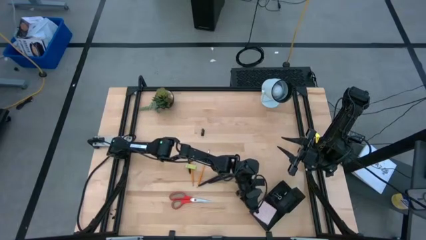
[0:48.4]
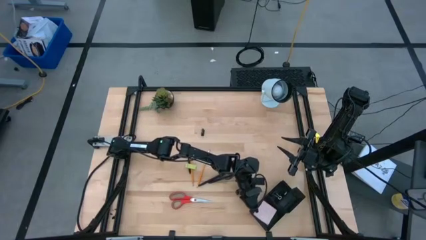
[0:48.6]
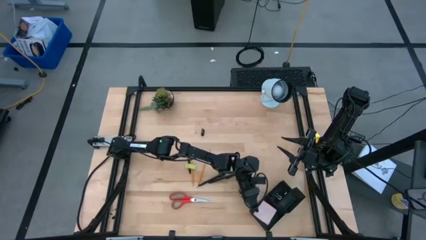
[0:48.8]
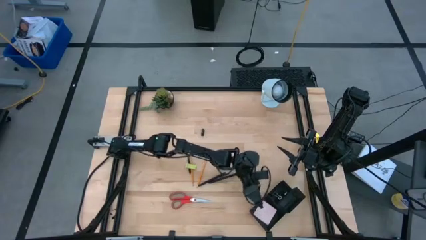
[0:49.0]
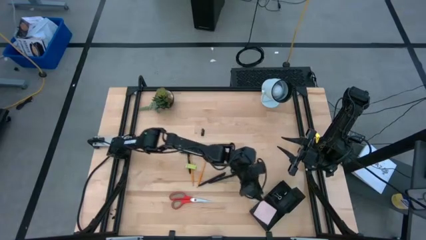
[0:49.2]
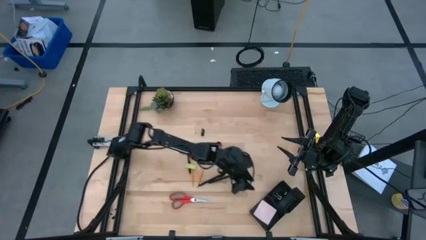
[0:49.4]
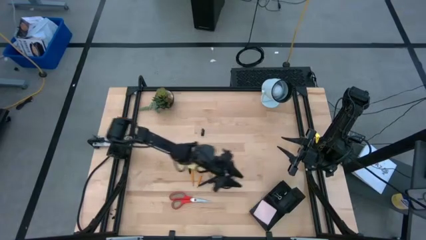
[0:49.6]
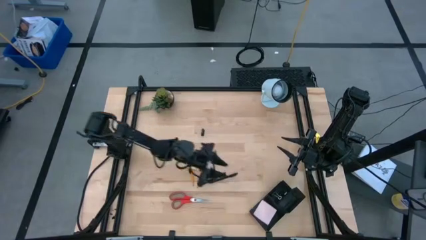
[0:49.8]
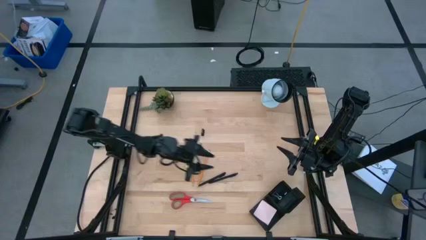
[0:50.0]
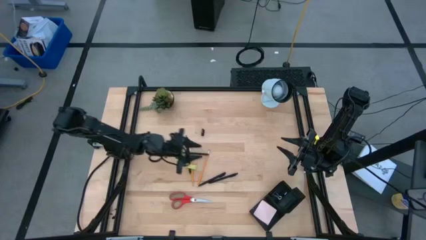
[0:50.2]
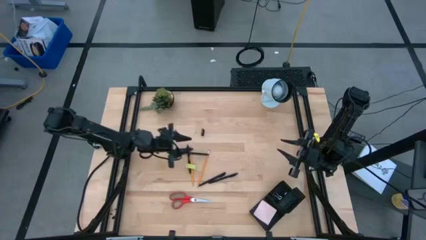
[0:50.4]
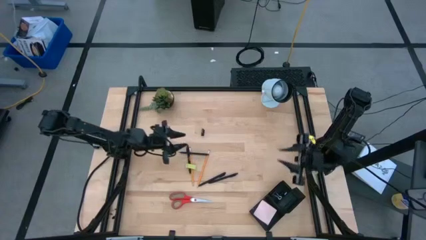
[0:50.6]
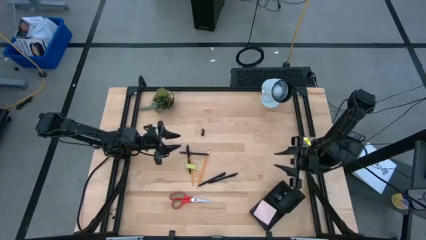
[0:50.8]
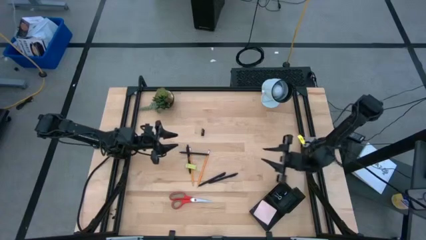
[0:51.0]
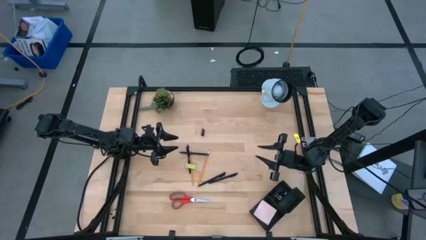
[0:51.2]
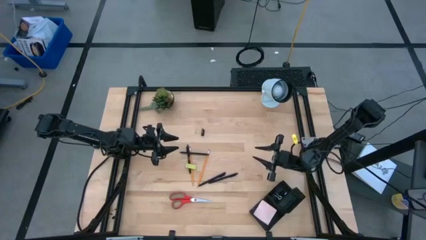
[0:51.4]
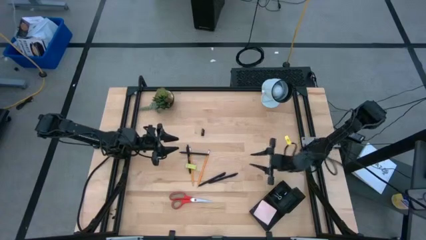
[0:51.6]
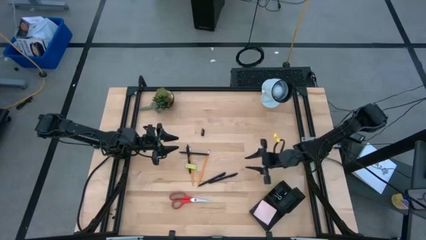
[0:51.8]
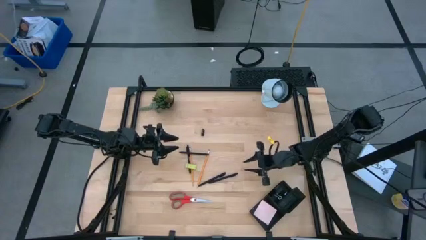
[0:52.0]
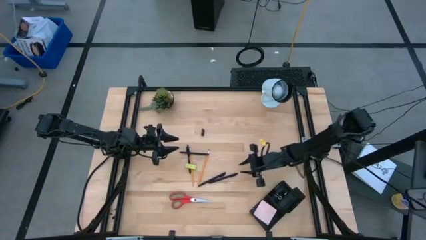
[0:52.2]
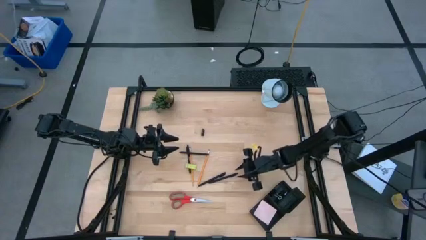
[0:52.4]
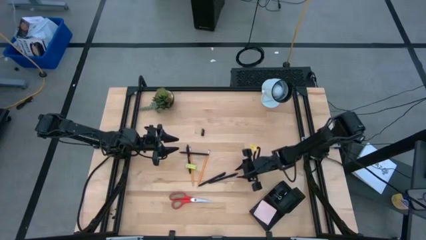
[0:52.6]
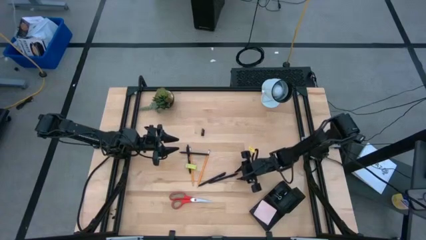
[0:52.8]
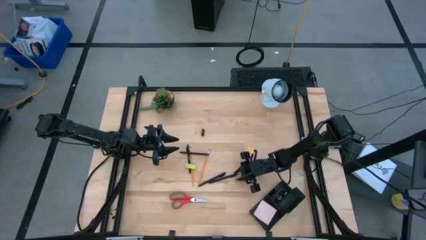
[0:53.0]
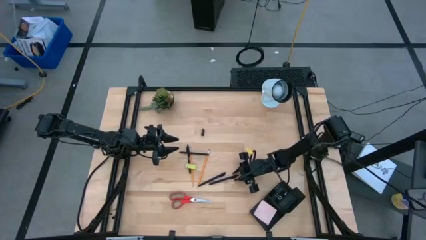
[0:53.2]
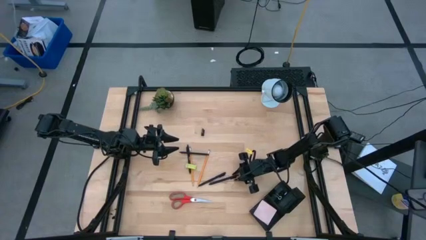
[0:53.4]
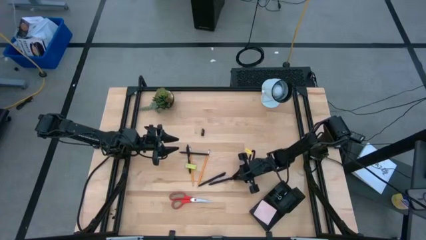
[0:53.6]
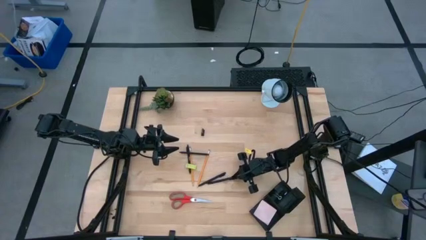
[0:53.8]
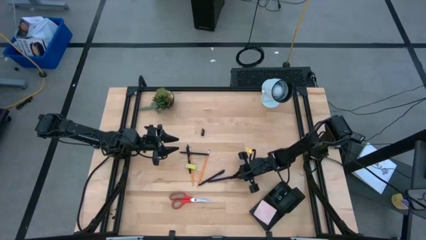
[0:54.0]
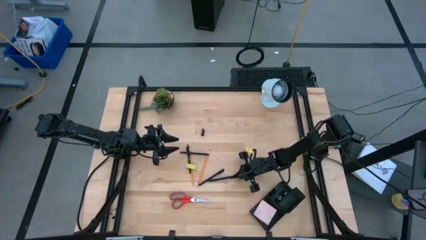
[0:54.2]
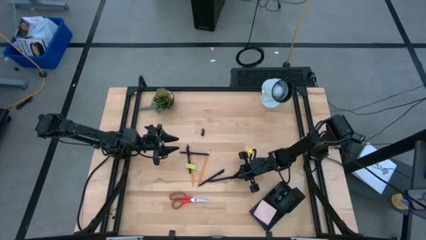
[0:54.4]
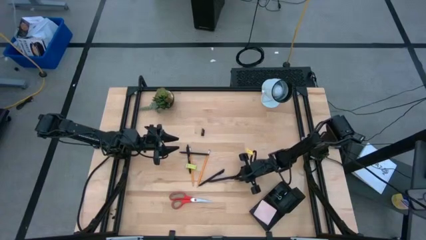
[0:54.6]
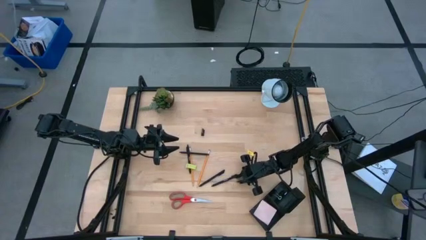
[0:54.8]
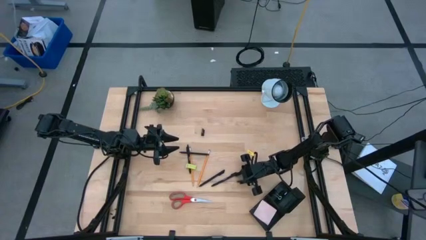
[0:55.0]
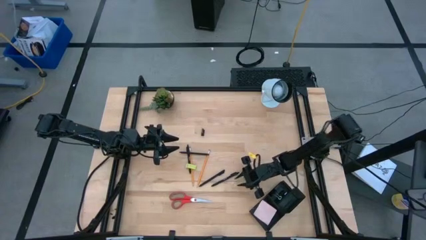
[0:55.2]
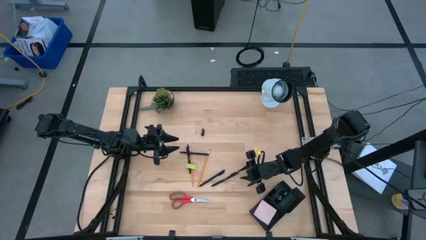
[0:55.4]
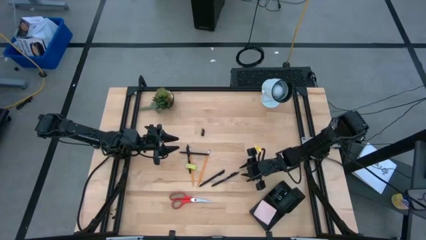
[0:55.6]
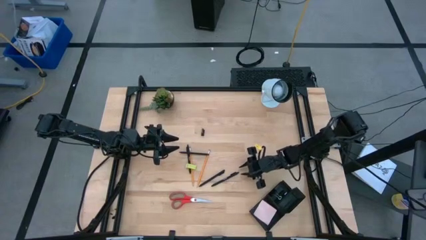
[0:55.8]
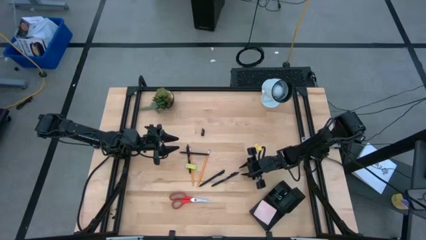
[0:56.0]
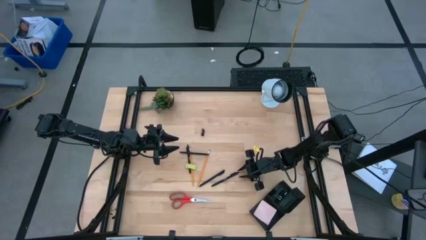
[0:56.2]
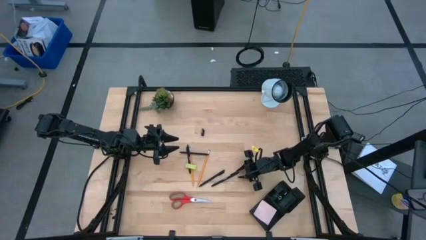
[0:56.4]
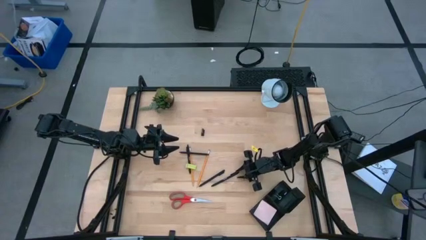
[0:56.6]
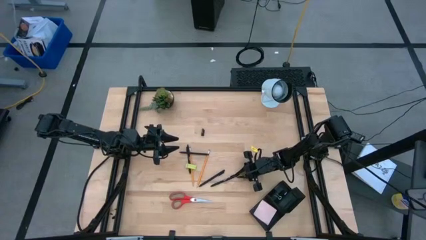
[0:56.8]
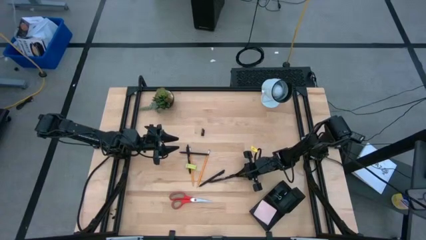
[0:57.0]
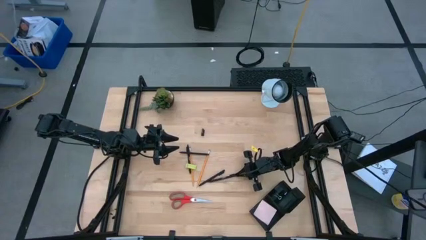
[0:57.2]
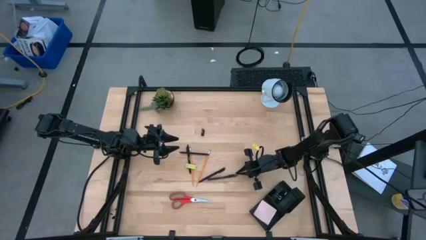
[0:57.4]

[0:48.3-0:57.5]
Task: Pick and place office supplies into organizer
Put the black pen into the desk organizer

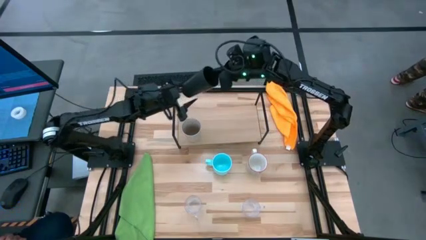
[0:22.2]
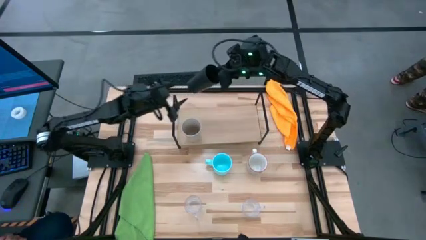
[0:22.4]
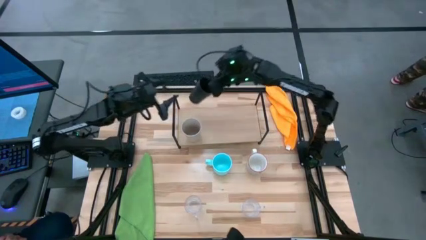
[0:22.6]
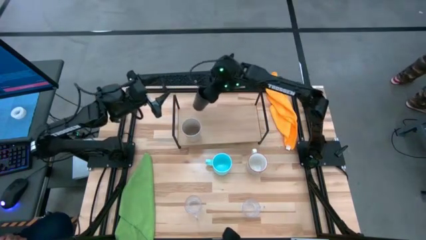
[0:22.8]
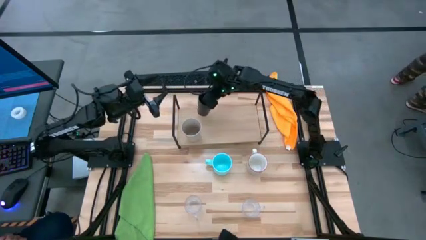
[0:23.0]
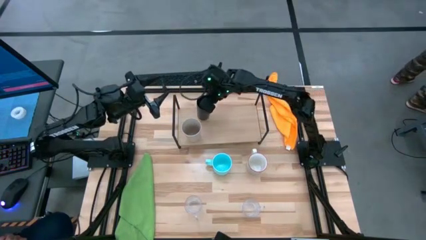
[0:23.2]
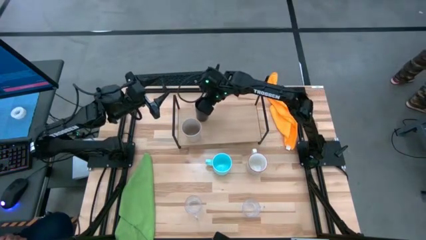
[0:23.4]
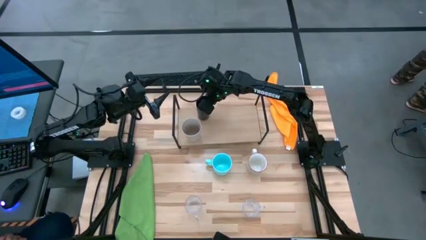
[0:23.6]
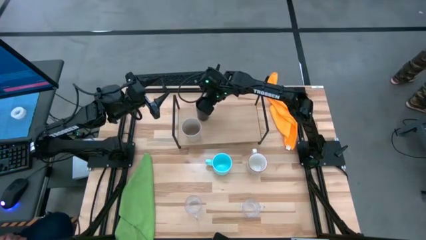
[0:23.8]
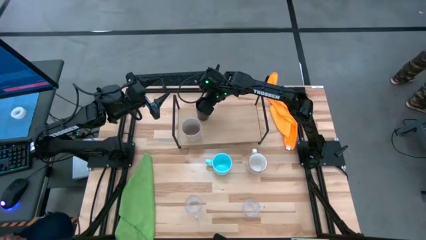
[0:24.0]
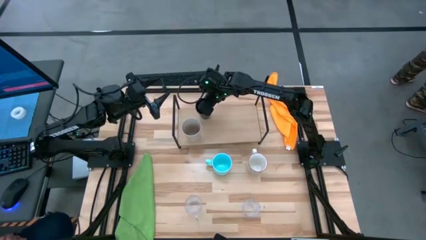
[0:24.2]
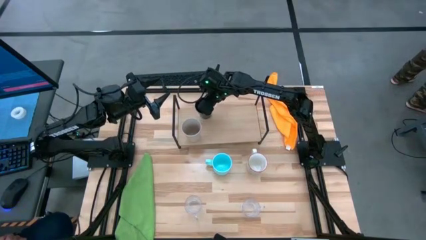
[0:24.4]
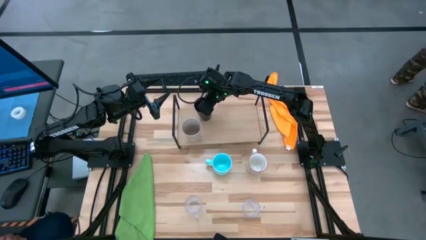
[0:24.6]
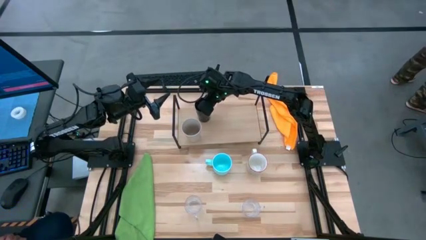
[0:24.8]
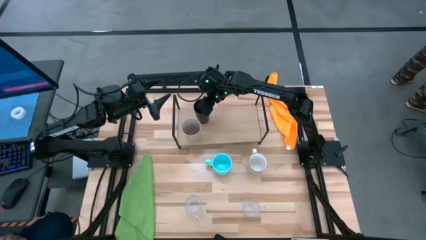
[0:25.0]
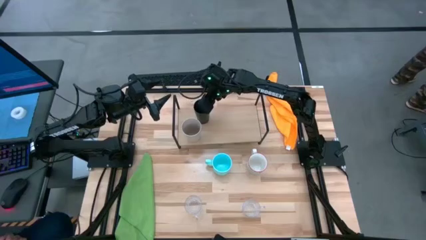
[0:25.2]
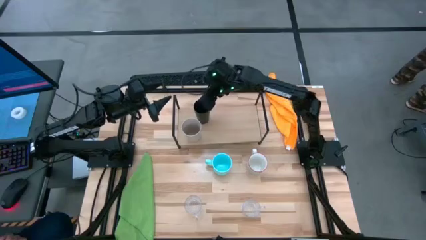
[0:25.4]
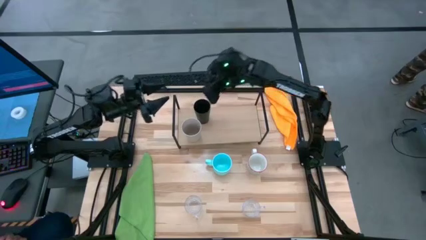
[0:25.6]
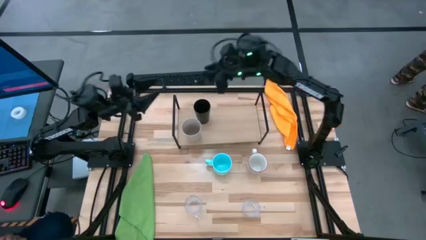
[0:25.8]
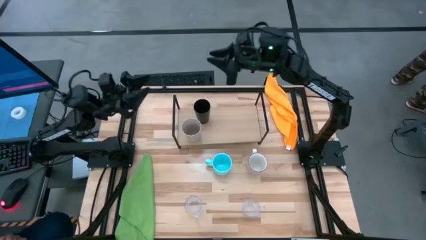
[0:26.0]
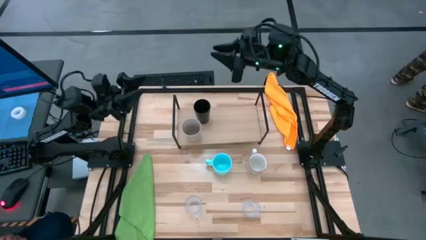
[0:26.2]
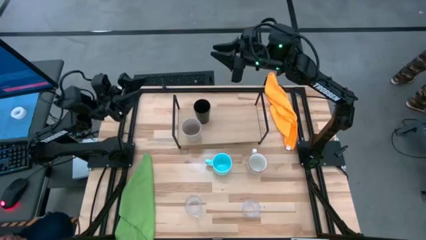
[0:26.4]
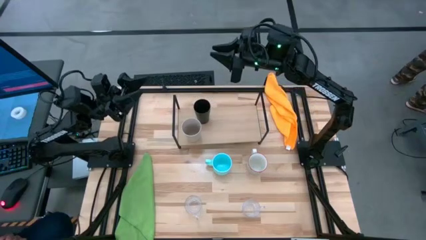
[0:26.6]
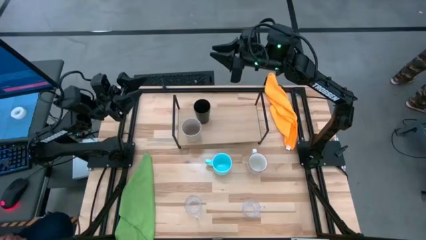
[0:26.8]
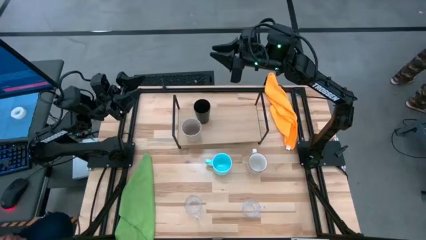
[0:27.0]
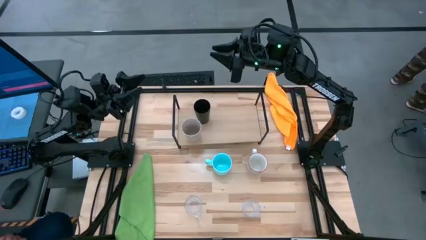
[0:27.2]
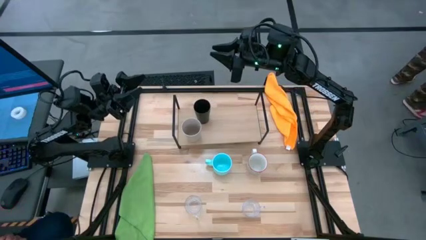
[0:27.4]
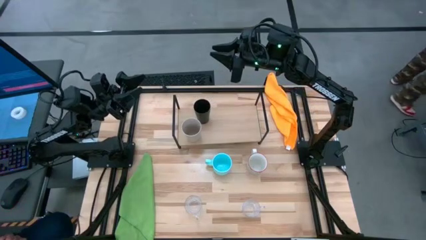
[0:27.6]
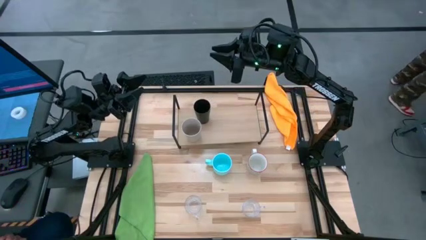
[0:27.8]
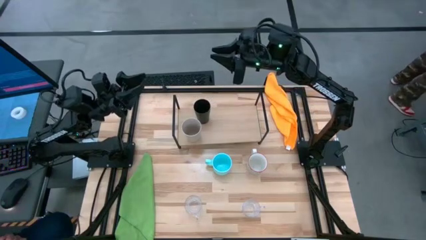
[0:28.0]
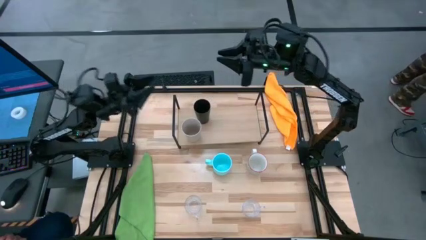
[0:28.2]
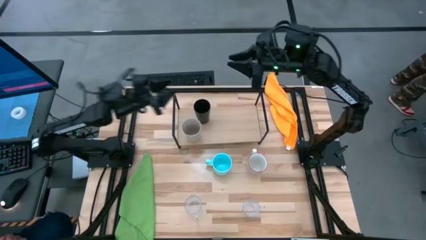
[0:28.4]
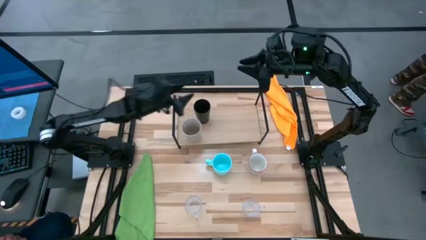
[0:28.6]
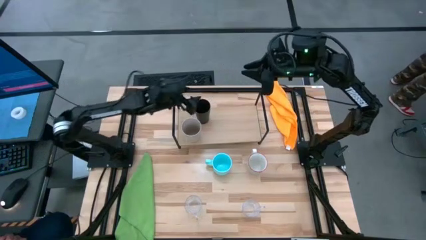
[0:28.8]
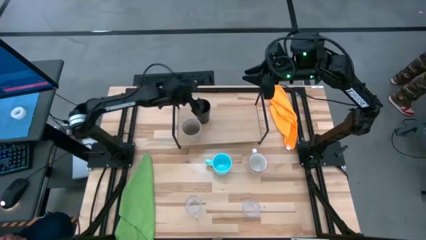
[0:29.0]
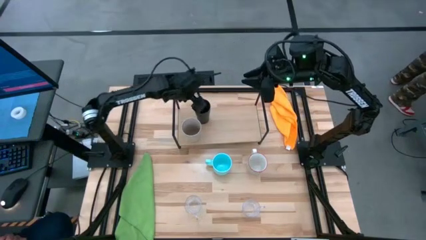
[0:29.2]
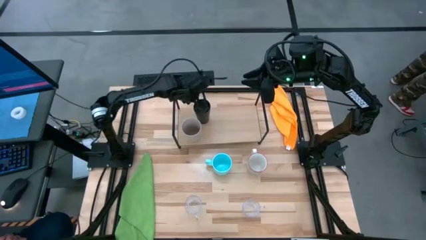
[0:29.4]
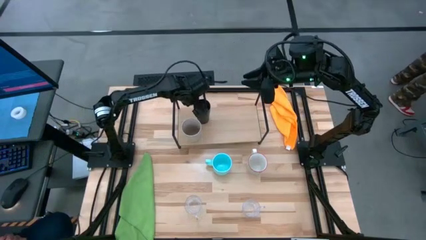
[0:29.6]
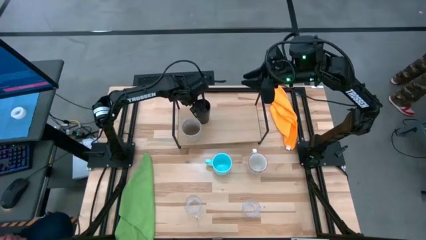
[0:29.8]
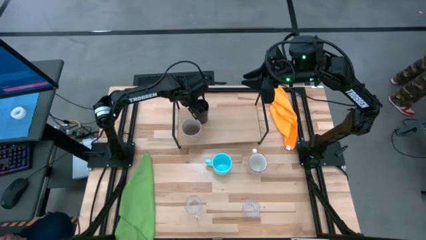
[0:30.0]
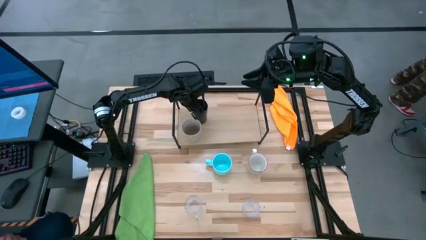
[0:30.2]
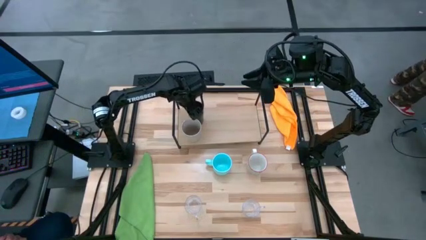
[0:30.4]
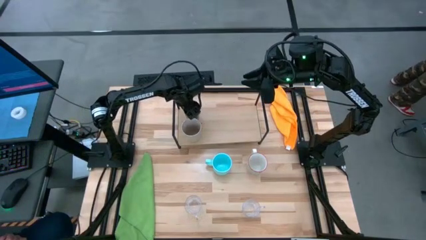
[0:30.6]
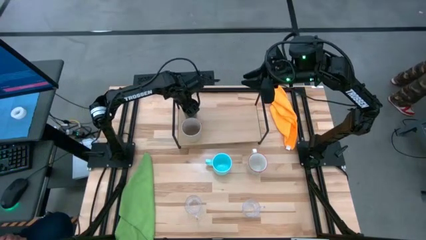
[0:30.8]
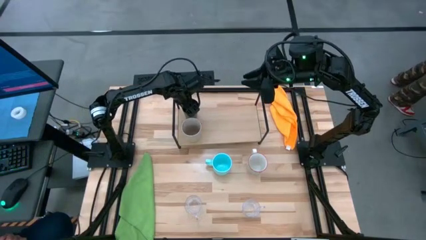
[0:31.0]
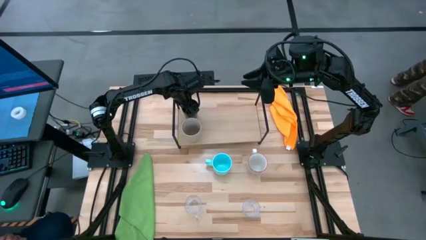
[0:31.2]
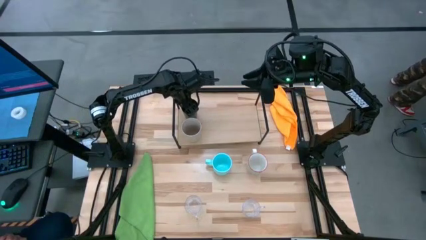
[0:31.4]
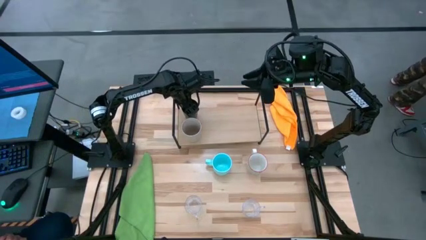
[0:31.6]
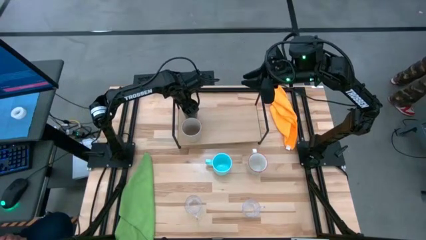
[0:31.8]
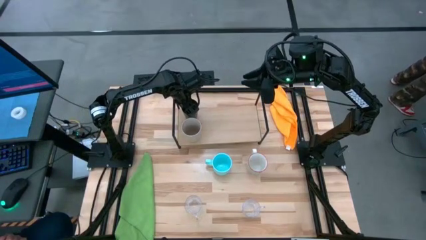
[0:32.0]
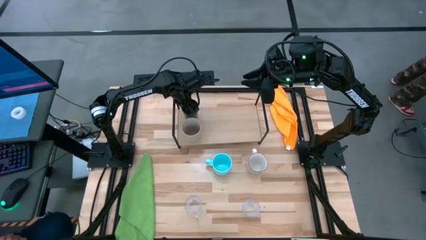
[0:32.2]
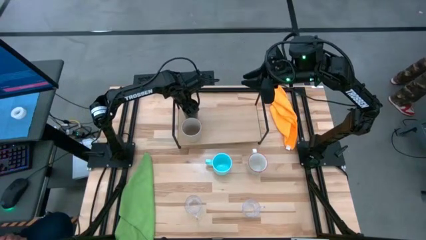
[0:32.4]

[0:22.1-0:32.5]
Task: Stack small to large cups/mugs on shelf
Put the black cup on the shelf
